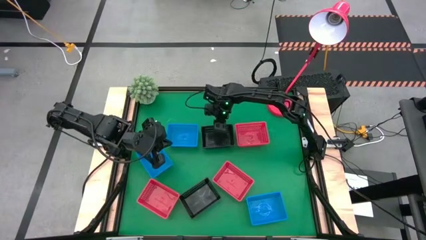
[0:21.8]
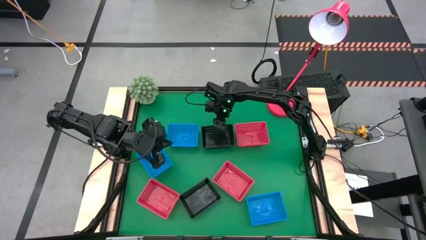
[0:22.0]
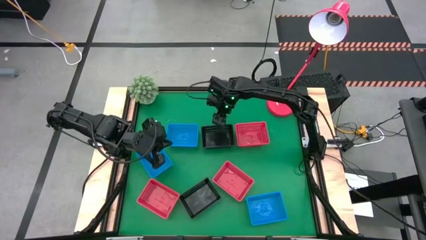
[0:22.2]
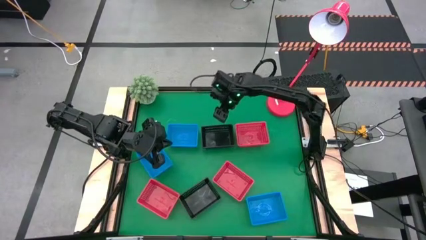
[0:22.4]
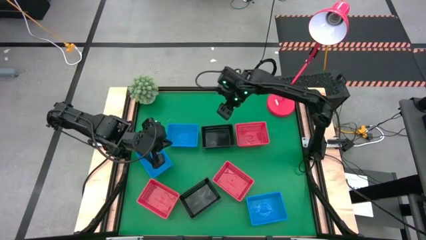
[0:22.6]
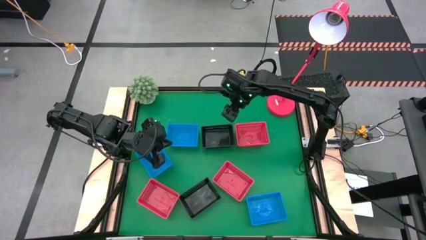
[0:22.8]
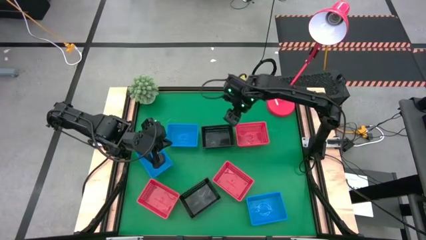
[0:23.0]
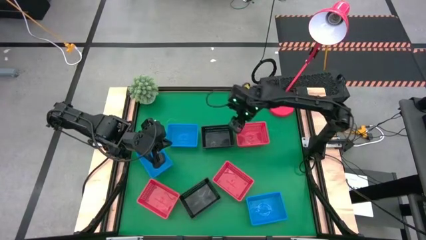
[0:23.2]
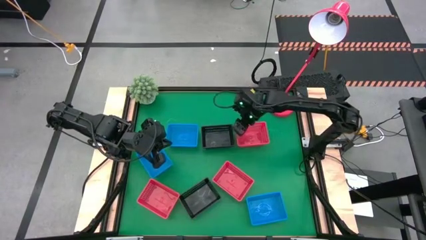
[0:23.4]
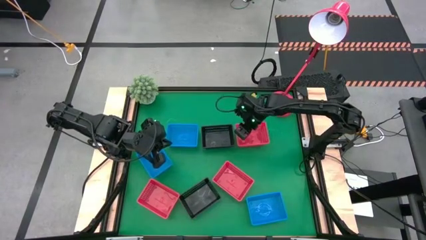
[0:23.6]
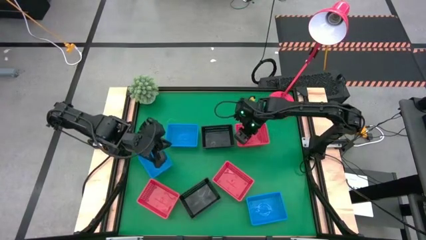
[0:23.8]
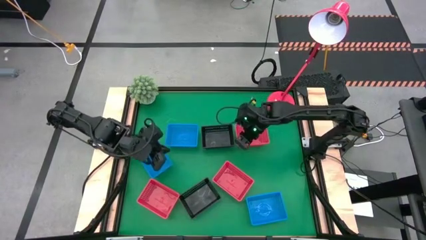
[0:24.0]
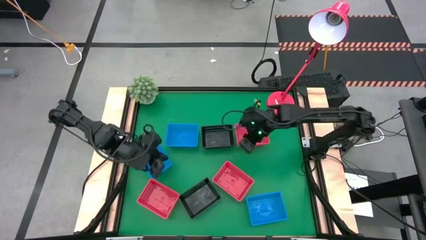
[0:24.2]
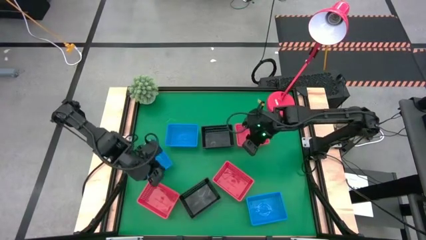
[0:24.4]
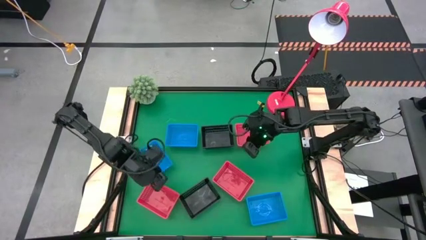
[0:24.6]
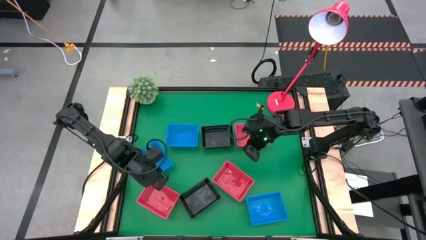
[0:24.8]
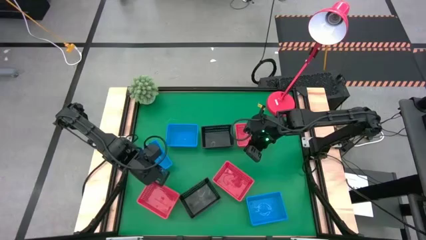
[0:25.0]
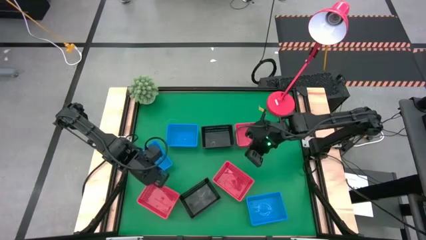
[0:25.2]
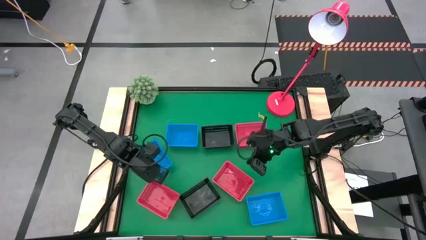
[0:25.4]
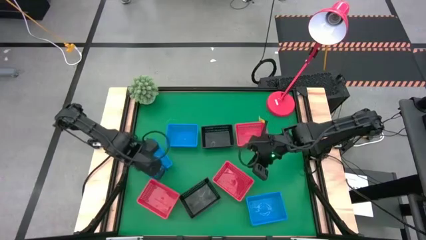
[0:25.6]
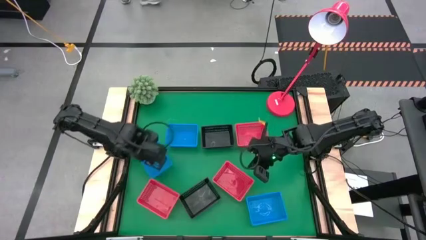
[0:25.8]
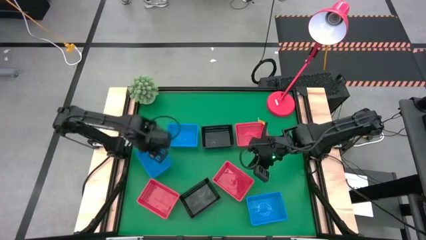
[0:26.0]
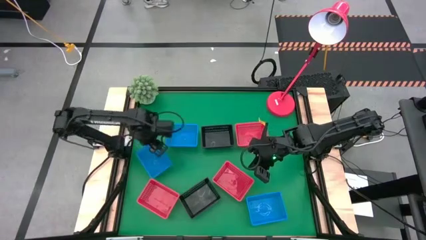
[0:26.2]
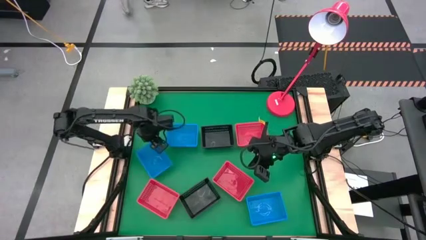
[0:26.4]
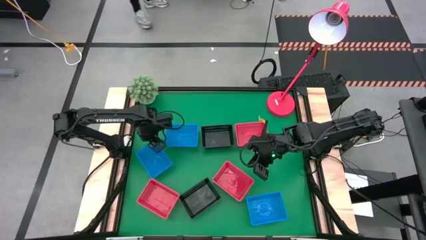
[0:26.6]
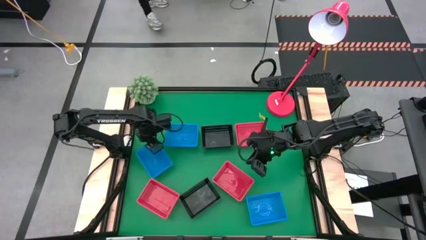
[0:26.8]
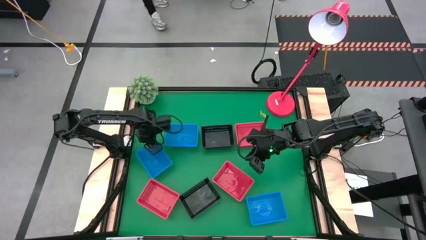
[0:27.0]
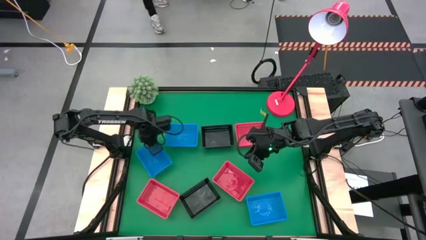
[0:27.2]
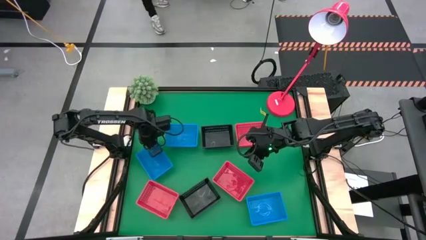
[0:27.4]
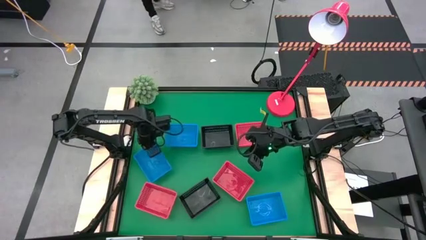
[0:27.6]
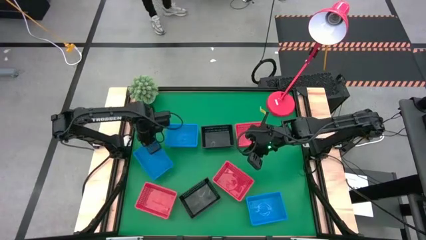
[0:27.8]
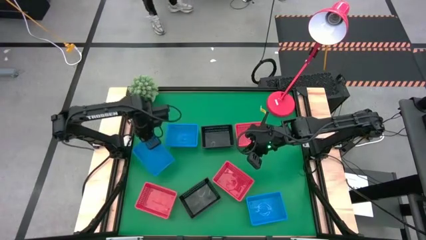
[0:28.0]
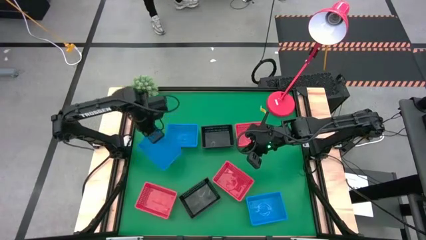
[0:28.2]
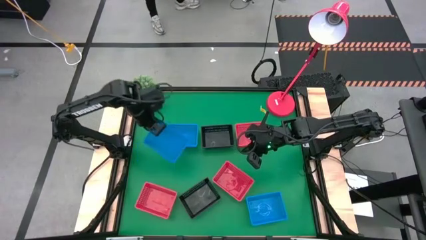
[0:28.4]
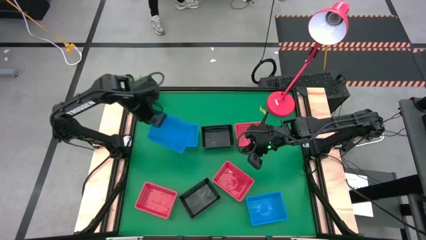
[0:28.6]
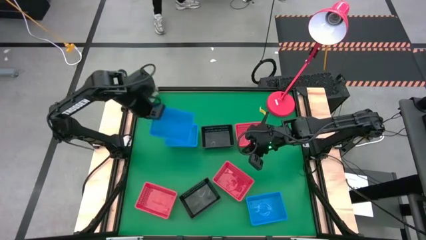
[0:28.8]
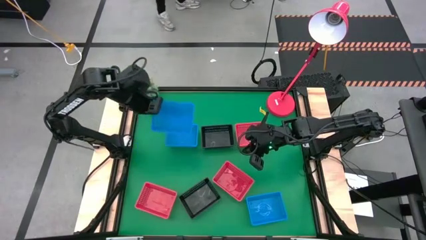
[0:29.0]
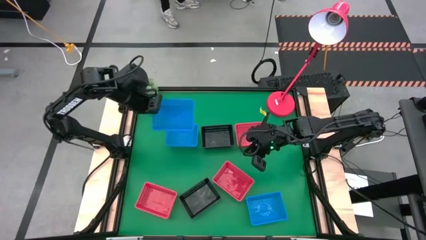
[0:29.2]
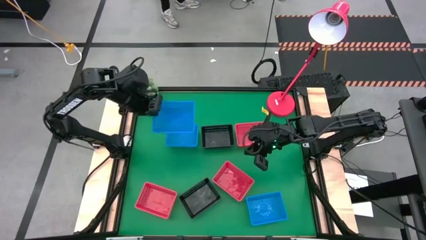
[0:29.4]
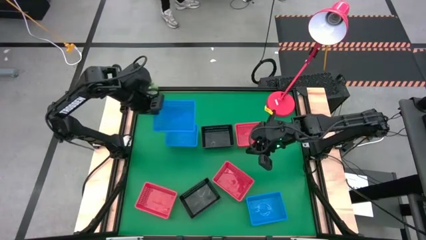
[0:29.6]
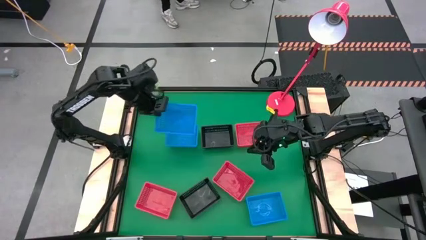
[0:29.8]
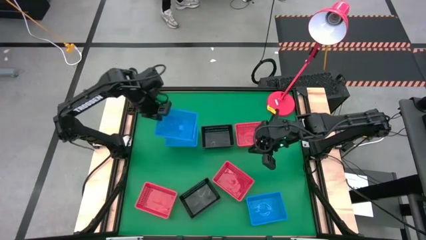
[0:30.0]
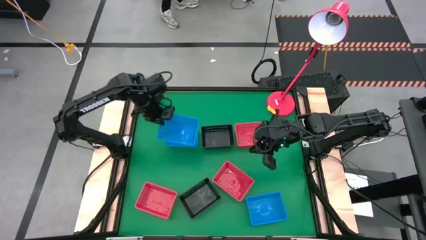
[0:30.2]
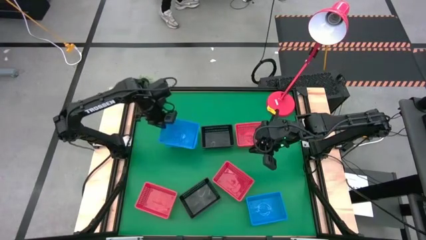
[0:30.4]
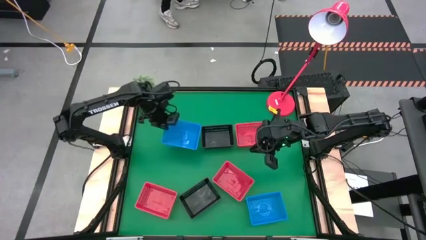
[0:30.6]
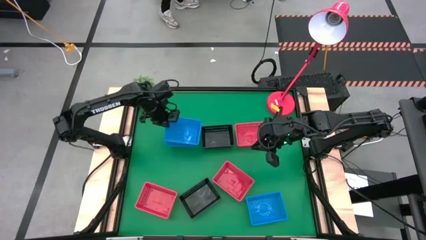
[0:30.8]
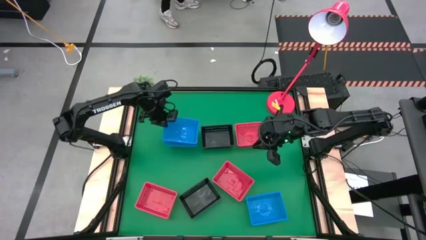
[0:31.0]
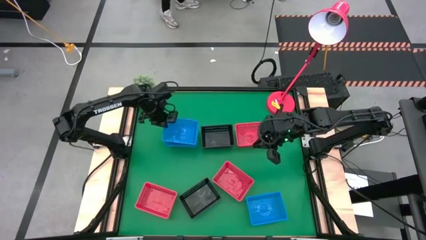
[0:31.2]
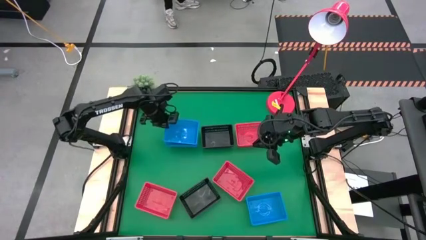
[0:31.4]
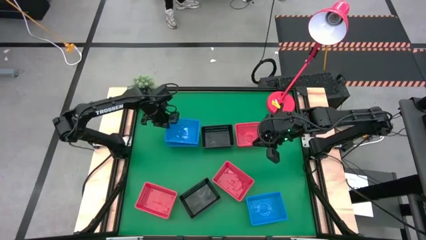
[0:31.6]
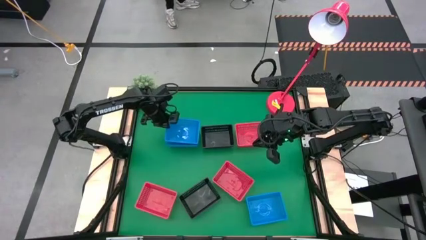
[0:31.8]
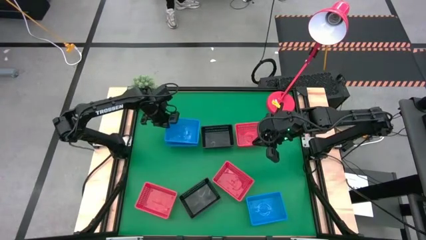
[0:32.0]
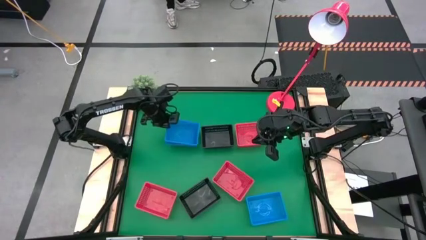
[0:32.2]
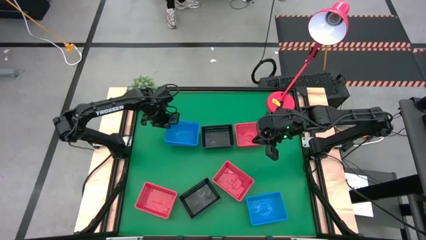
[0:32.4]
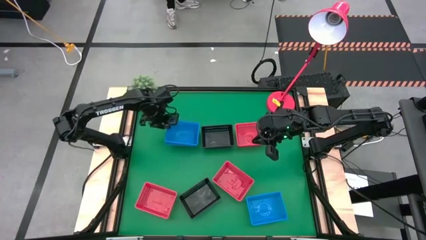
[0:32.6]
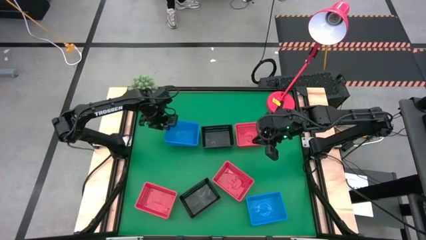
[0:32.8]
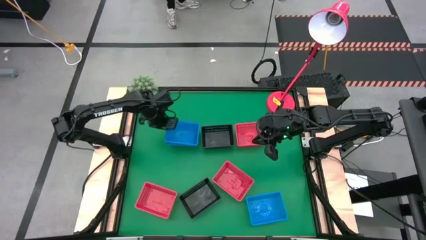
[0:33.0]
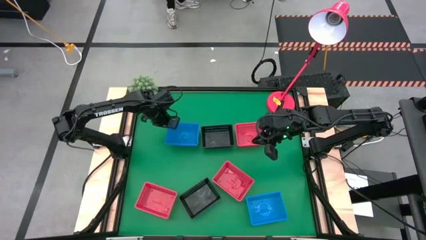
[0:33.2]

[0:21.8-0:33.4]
Stack the middle blue bin on the top blue bin
